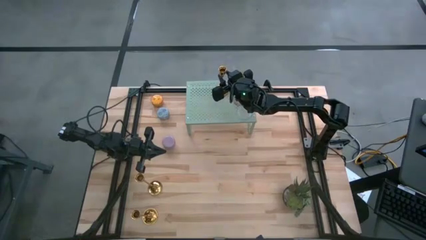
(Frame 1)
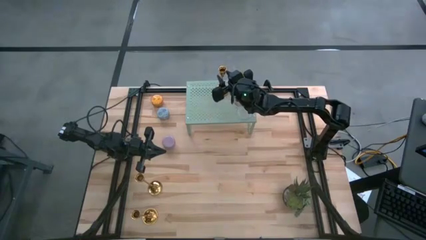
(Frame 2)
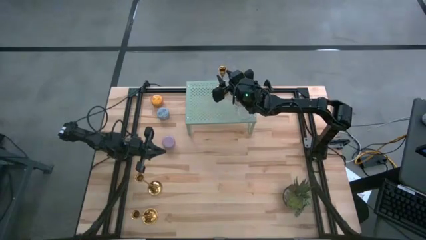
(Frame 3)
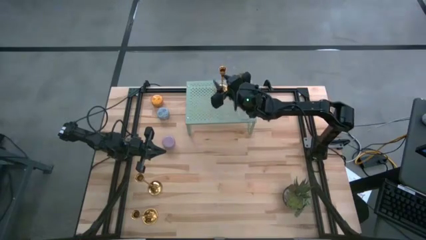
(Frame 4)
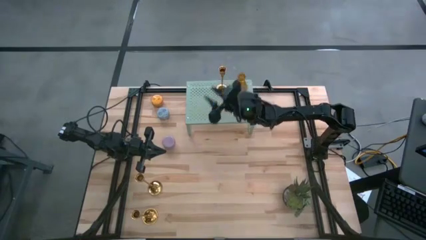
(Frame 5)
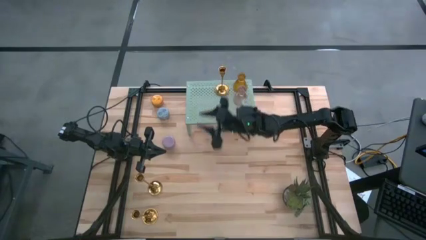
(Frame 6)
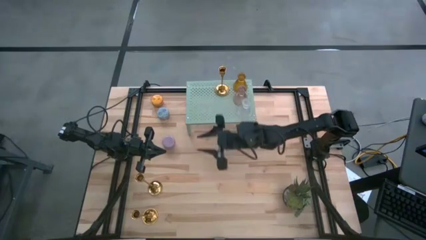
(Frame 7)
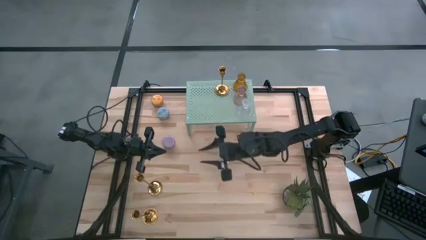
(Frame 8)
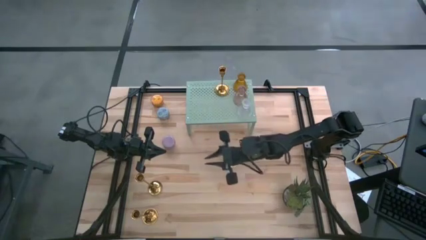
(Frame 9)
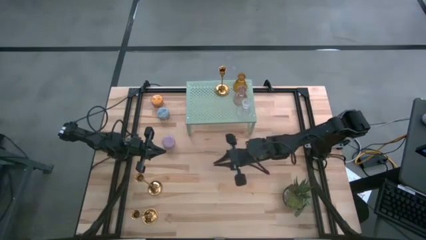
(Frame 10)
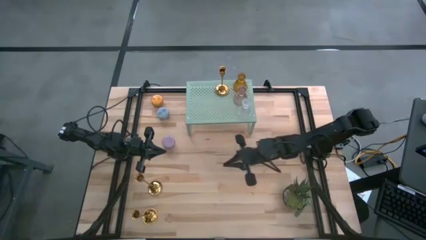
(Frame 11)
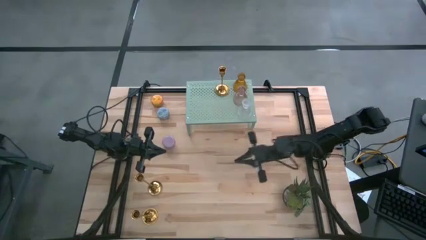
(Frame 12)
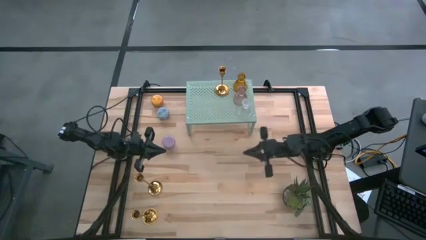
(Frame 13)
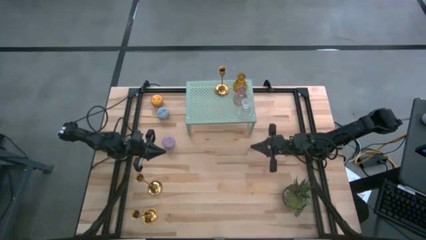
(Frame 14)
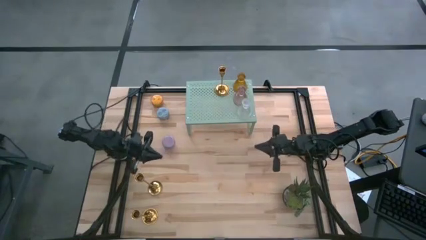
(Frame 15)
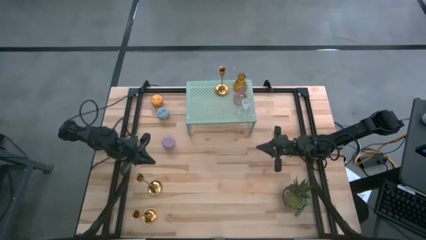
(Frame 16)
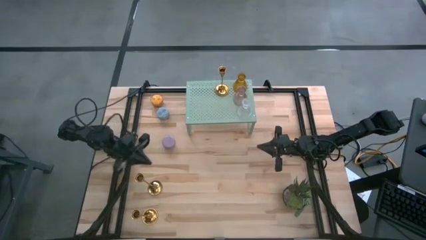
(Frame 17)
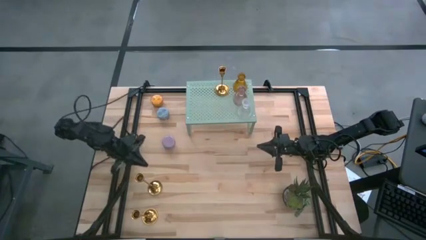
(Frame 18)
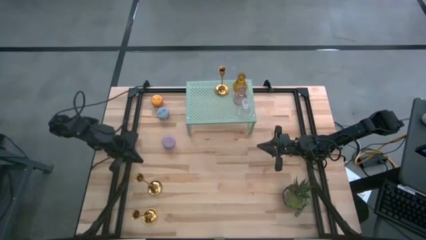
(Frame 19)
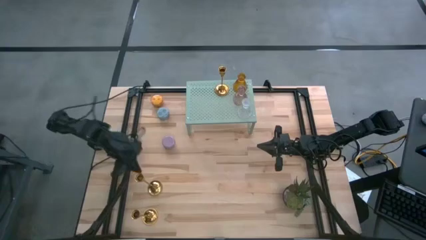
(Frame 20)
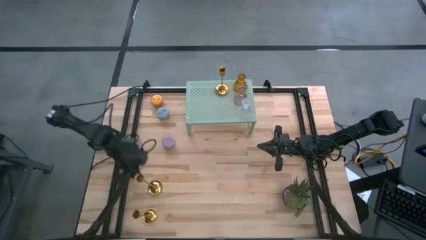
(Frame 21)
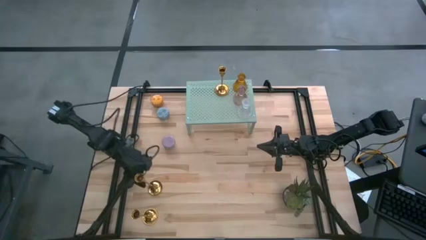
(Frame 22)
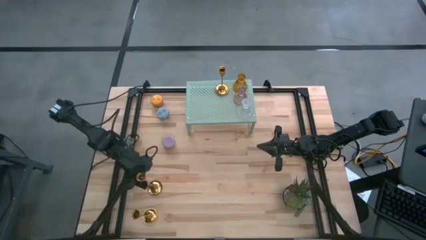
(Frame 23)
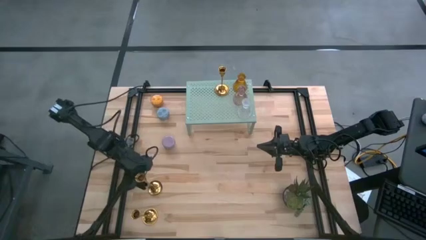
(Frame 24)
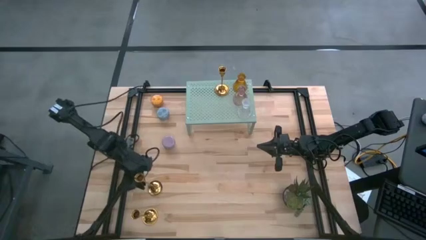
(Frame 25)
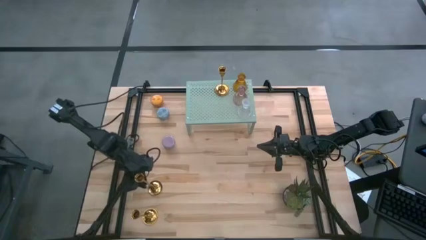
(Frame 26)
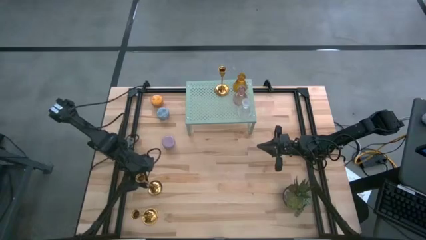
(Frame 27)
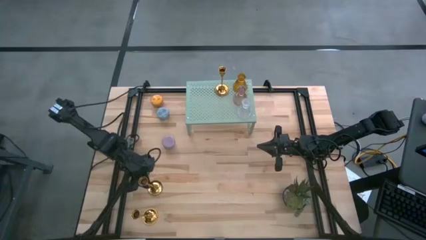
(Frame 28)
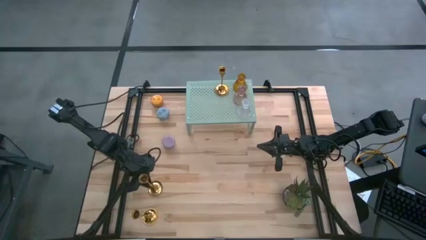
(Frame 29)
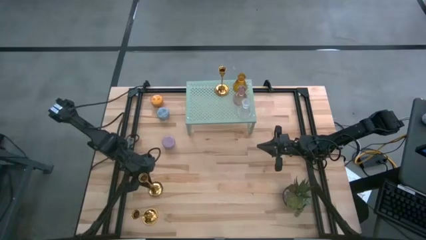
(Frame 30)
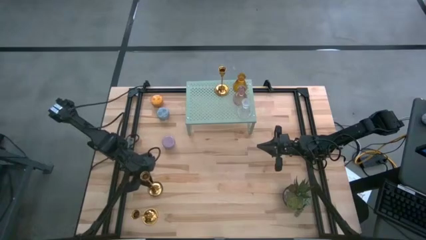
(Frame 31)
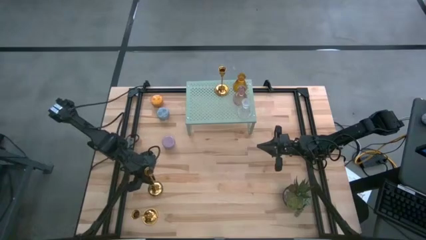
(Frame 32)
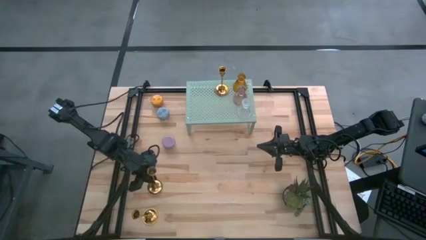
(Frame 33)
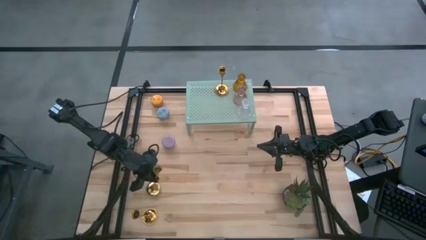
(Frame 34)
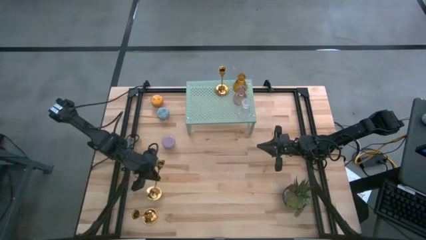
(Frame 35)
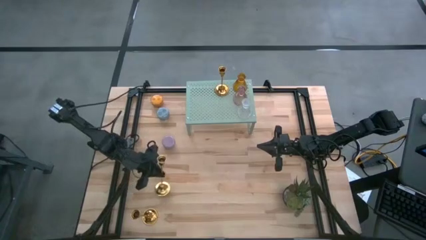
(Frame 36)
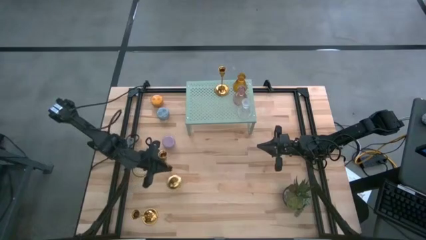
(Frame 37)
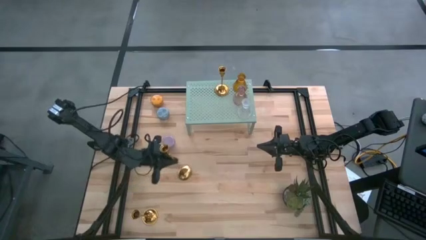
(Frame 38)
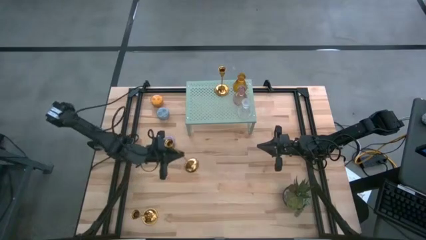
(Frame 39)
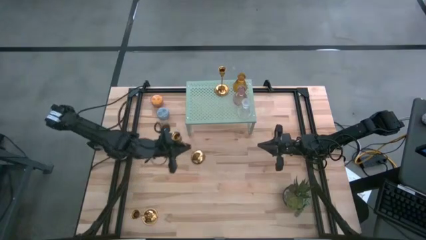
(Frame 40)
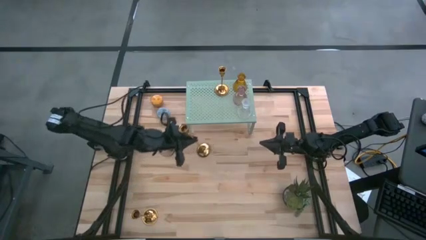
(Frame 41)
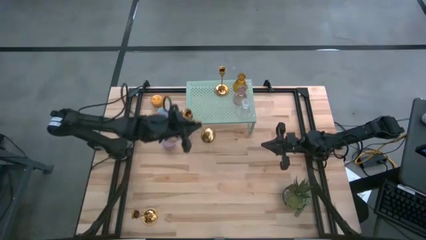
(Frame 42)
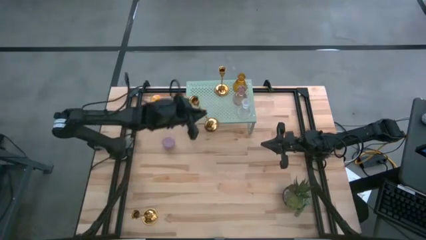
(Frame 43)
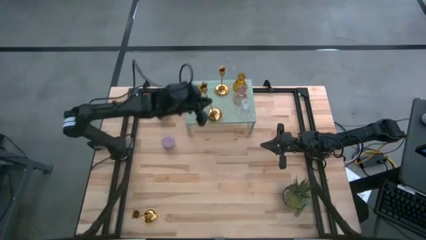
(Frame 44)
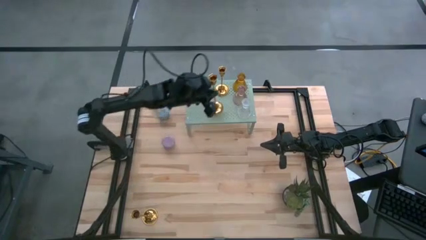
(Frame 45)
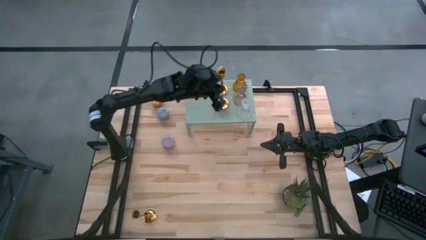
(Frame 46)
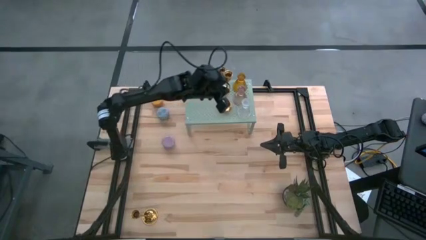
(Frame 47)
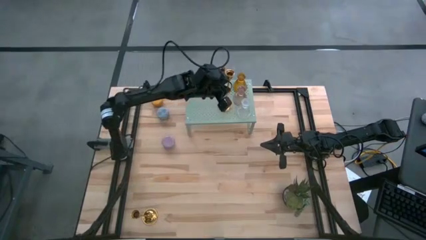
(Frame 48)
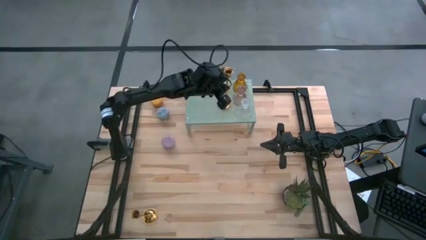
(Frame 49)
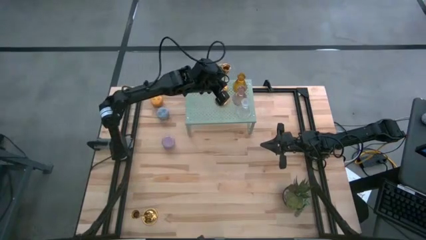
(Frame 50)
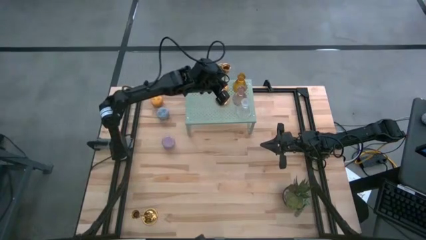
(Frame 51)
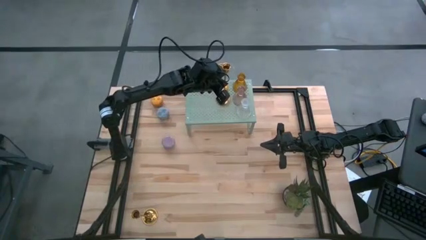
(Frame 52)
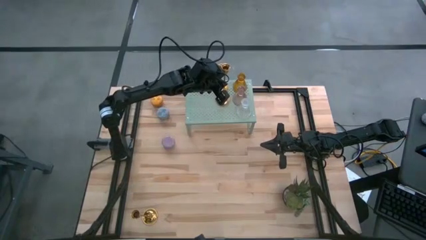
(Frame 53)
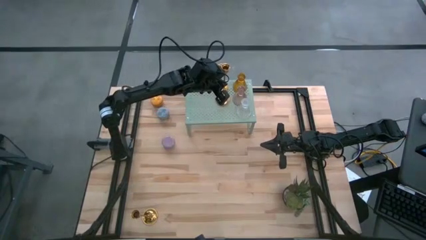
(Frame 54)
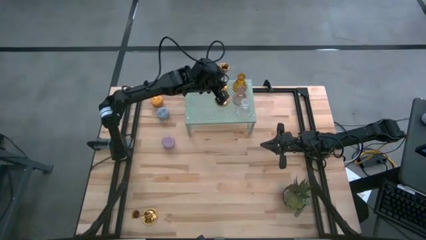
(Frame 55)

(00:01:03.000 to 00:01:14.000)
Task: Pick & Place candle stick holders
Put the top gold candle holder on the shelf

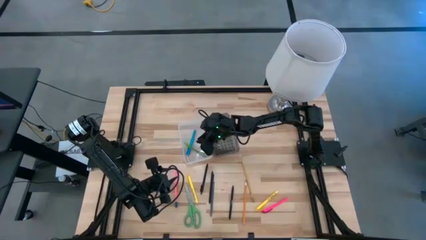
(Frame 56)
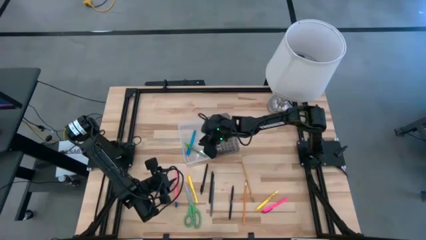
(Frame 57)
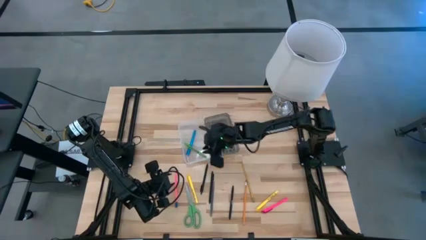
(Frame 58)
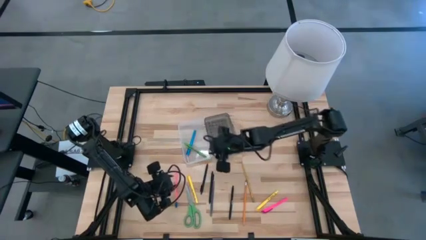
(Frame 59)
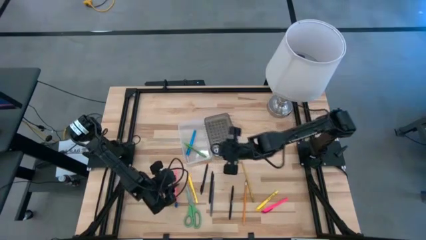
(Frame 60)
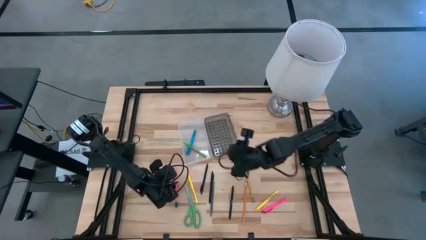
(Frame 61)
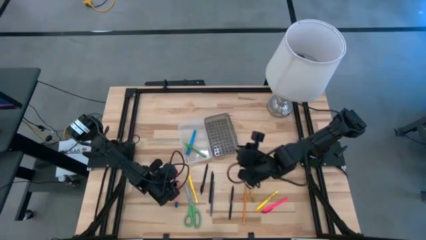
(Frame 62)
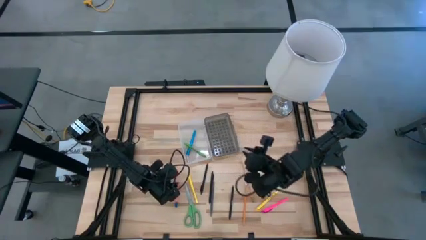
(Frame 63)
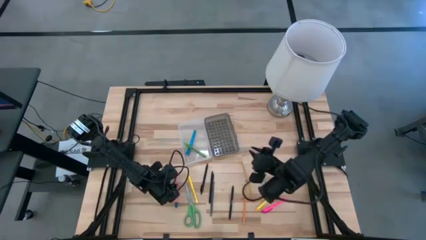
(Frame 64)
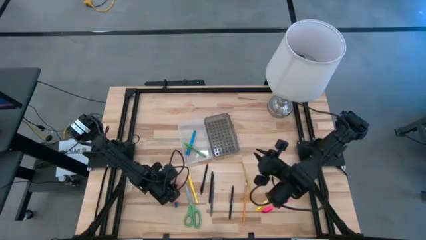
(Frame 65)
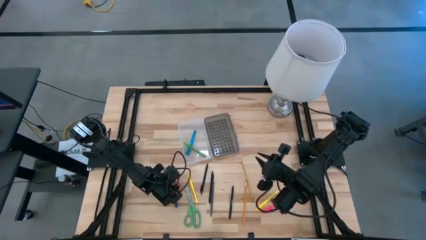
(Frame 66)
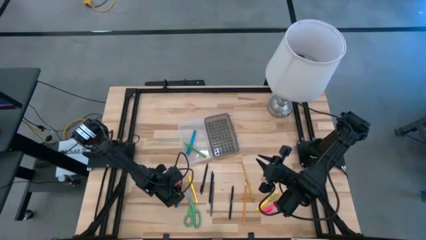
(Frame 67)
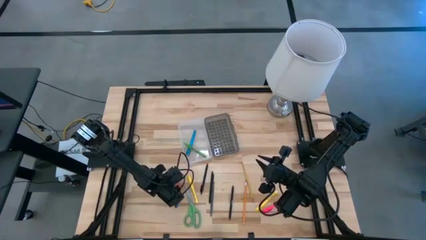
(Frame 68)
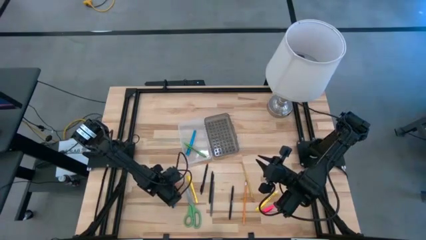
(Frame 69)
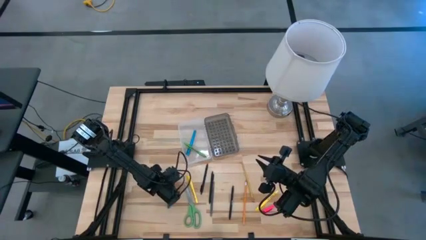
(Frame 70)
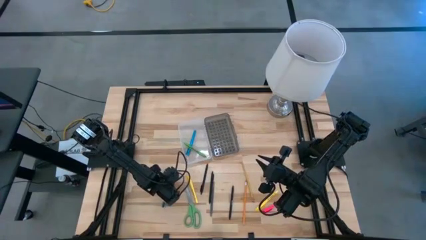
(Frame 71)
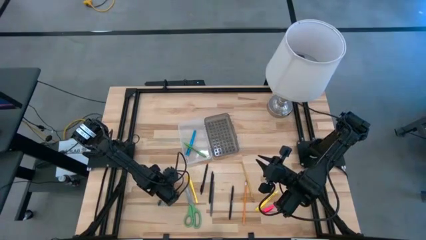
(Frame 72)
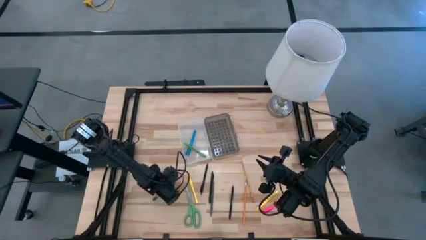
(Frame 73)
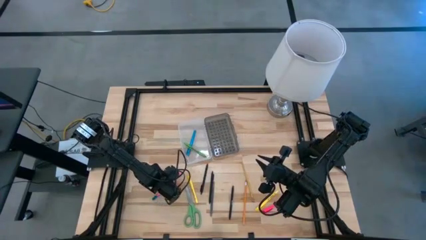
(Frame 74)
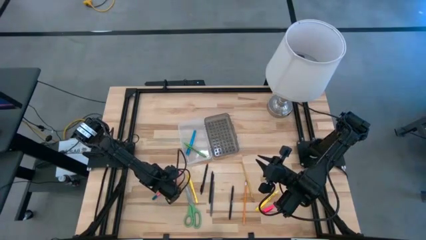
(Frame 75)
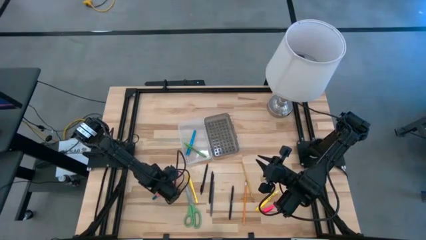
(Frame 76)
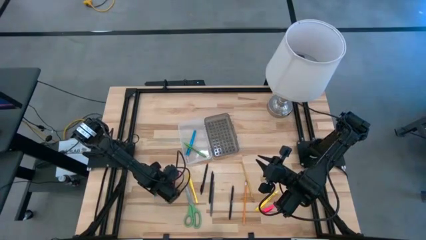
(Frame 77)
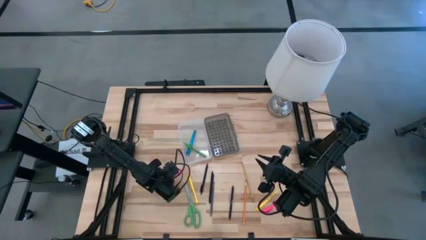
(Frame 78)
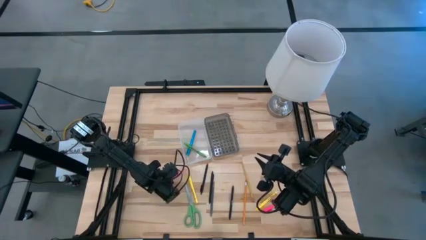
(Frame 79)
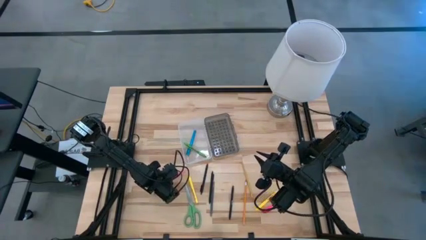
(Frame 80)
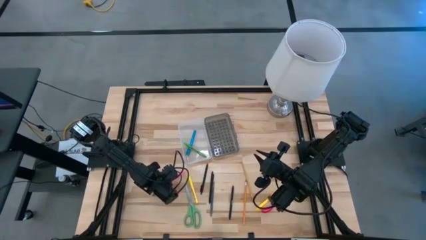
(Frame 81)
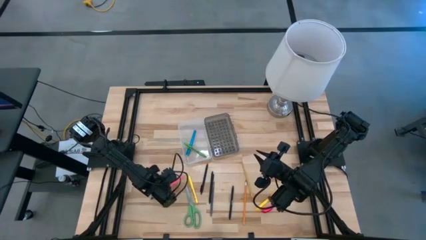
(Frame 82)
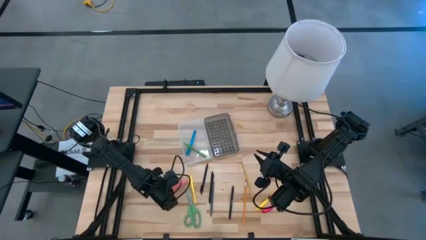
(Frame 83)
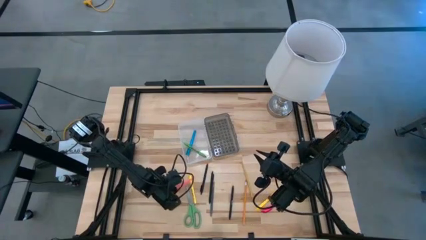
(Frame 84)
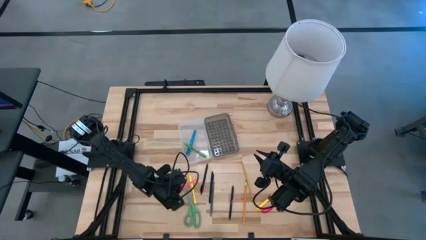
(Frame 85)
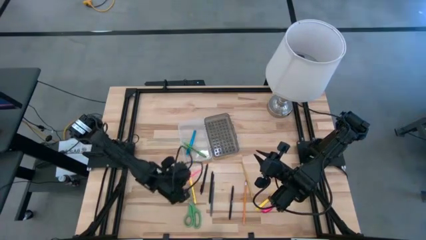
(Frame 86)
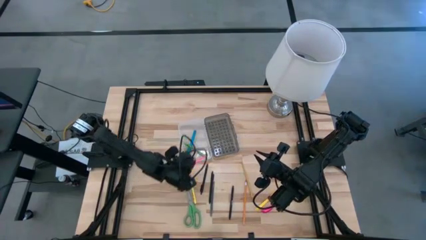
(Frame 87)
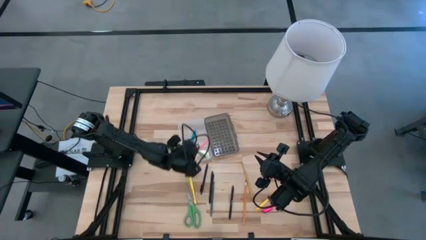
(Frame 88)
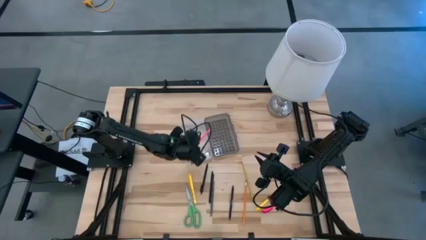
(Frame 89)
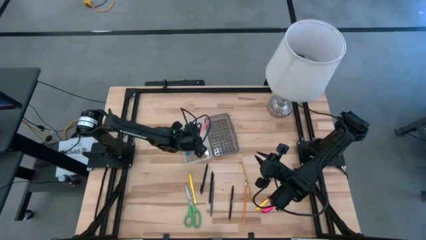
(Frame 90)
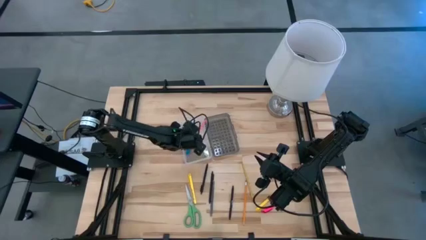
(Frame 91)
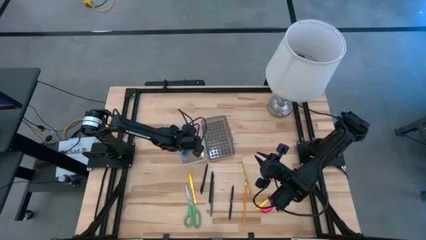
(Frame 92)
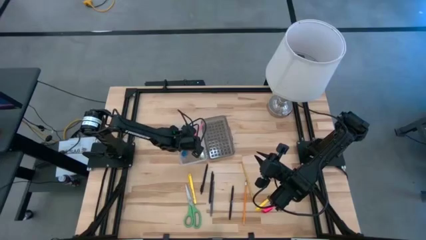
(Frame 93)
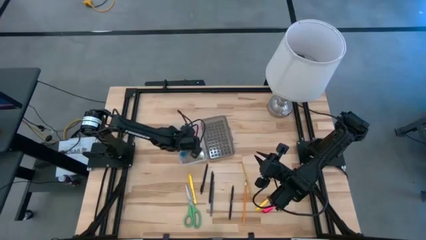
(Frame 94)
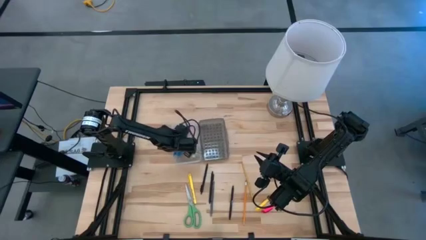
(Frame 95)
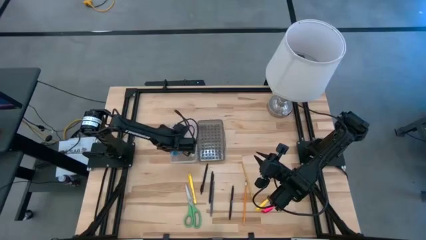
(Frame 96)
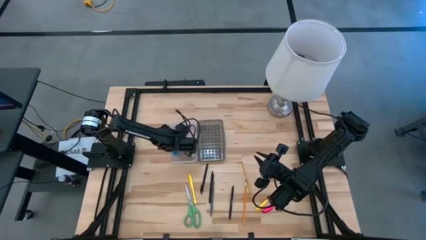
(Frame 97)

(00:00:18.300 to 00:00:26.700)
Task: Pick & place school supplies into a supply box
Put the pink pencil into the black supply box
